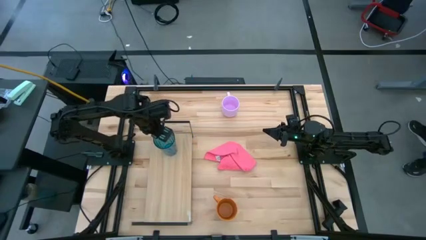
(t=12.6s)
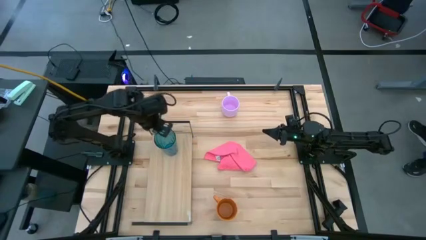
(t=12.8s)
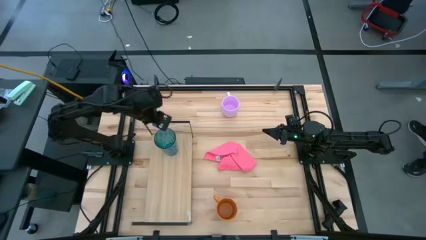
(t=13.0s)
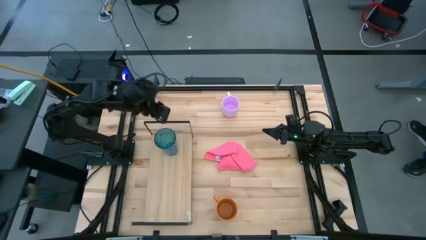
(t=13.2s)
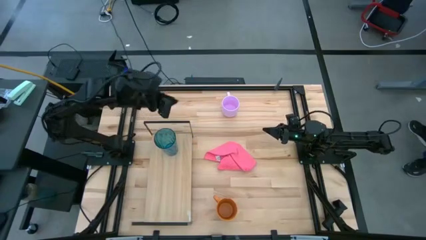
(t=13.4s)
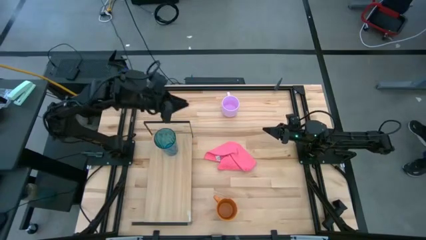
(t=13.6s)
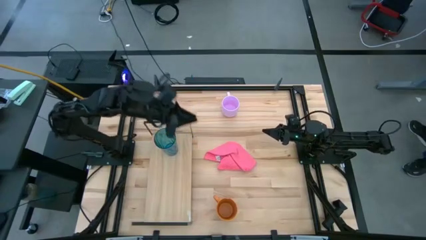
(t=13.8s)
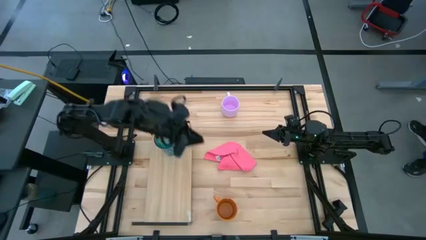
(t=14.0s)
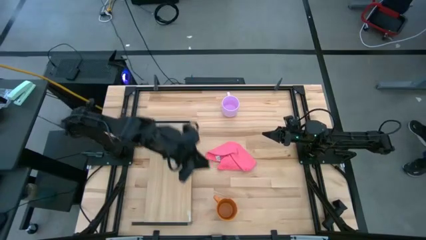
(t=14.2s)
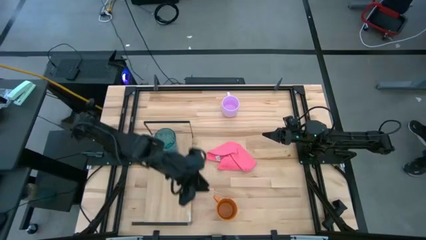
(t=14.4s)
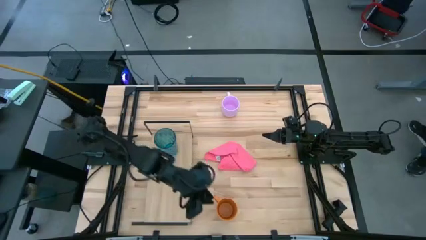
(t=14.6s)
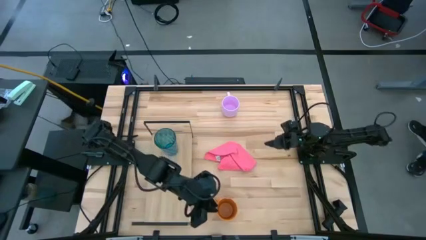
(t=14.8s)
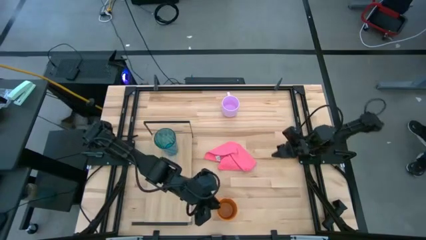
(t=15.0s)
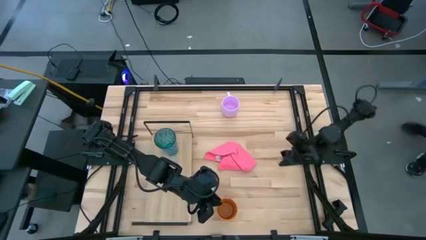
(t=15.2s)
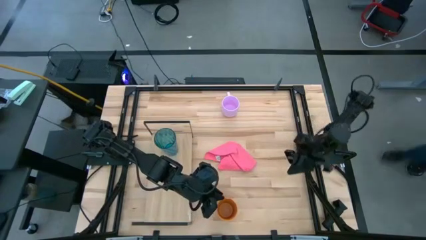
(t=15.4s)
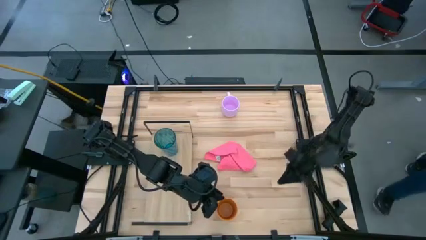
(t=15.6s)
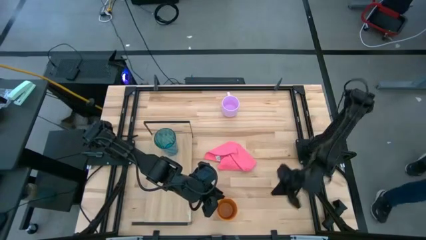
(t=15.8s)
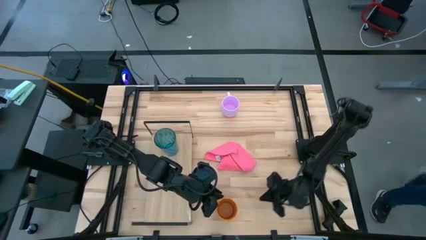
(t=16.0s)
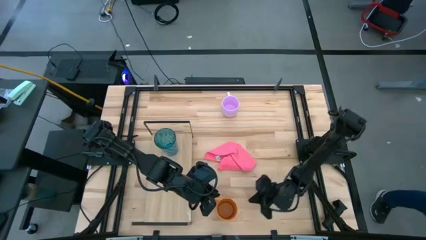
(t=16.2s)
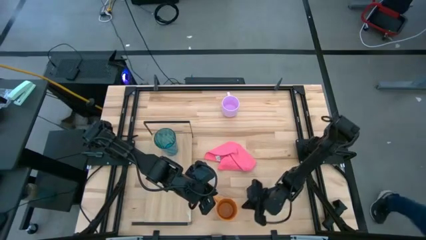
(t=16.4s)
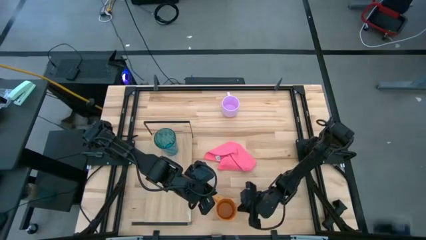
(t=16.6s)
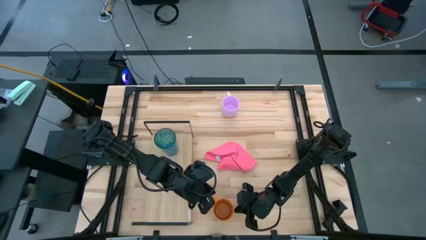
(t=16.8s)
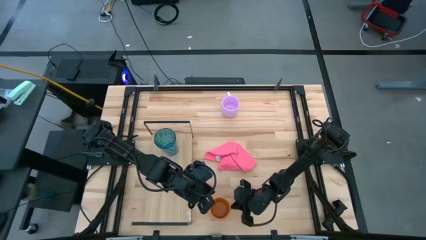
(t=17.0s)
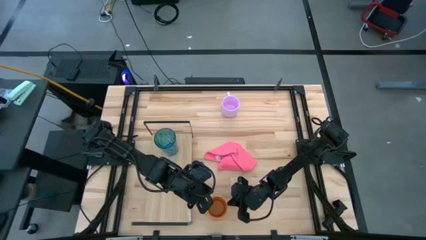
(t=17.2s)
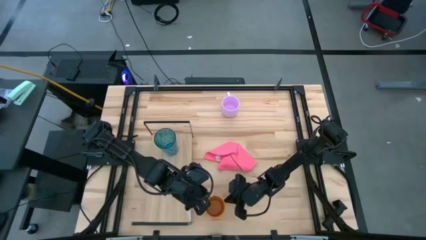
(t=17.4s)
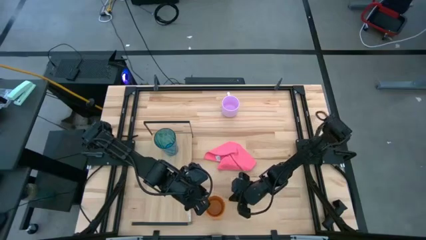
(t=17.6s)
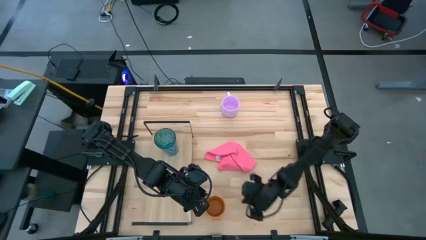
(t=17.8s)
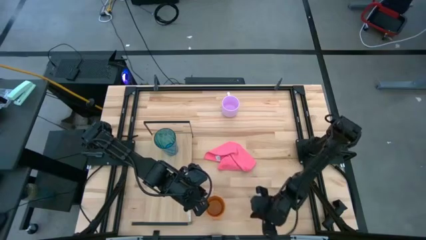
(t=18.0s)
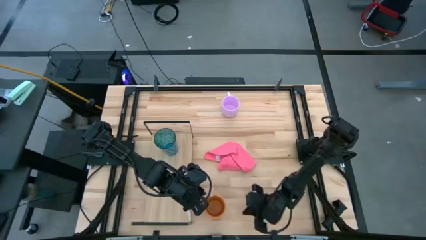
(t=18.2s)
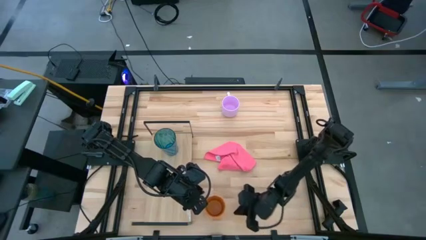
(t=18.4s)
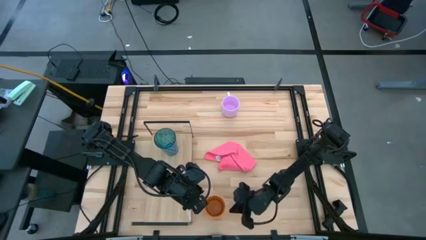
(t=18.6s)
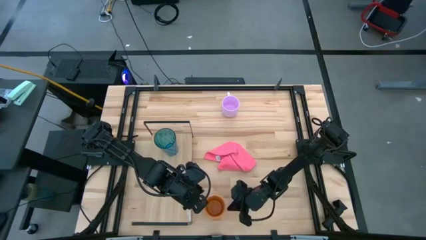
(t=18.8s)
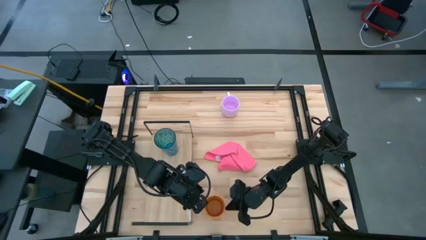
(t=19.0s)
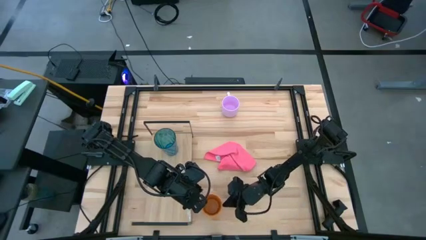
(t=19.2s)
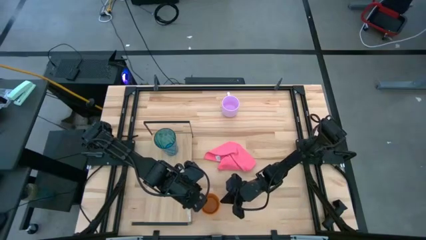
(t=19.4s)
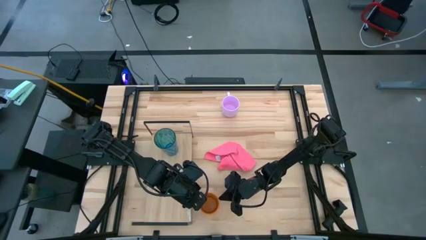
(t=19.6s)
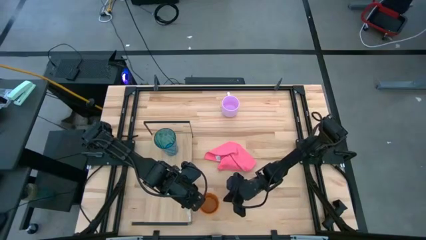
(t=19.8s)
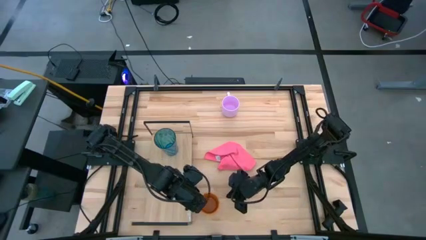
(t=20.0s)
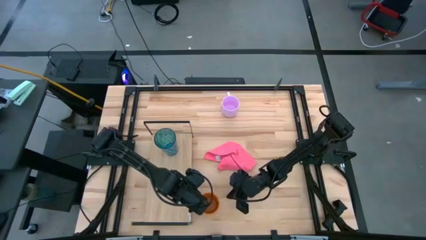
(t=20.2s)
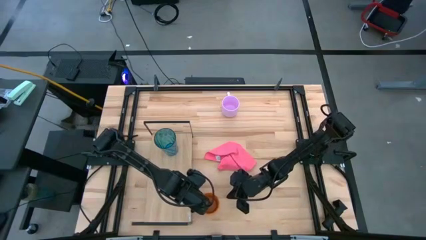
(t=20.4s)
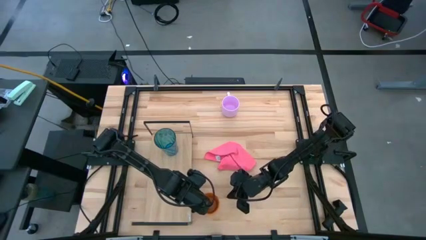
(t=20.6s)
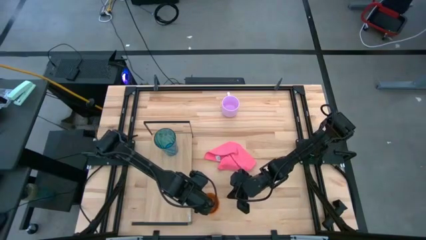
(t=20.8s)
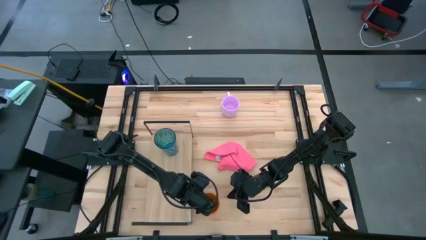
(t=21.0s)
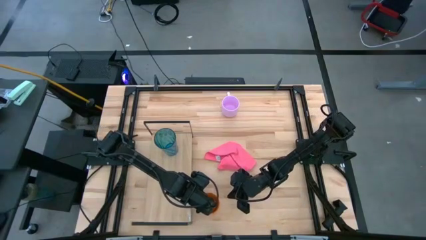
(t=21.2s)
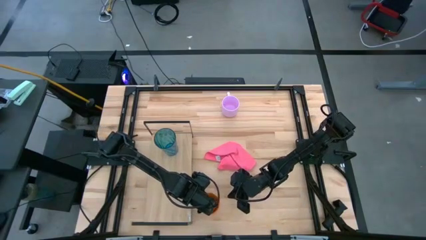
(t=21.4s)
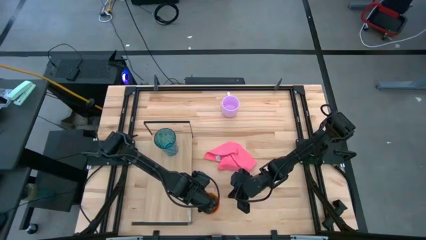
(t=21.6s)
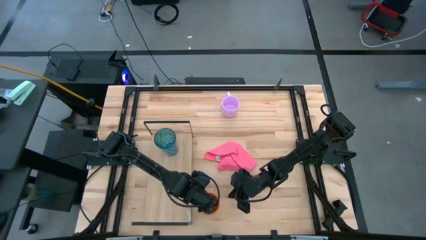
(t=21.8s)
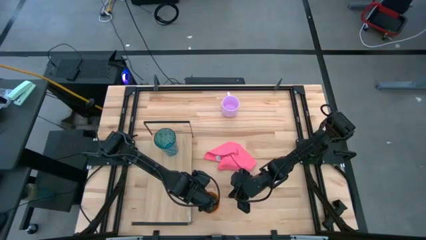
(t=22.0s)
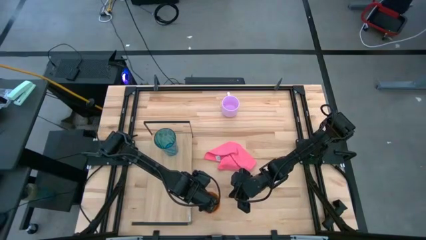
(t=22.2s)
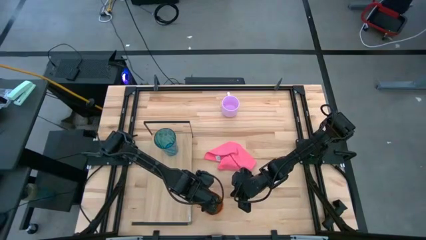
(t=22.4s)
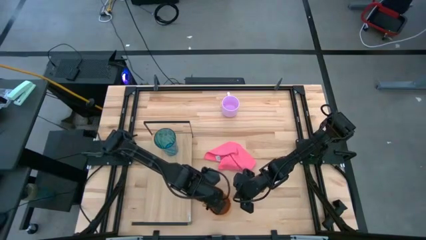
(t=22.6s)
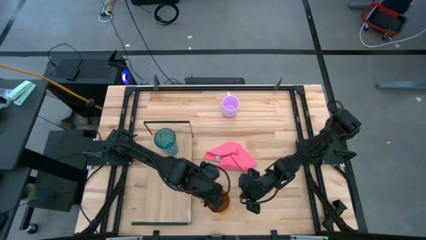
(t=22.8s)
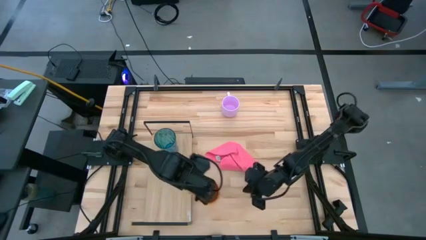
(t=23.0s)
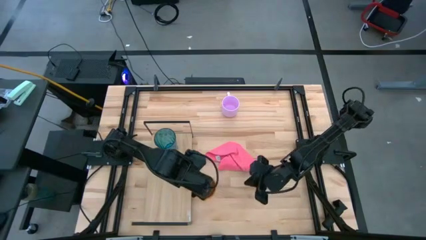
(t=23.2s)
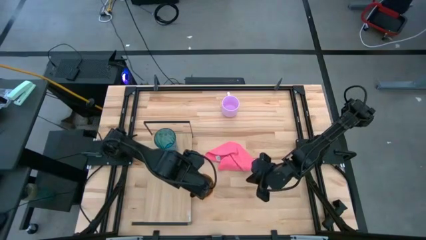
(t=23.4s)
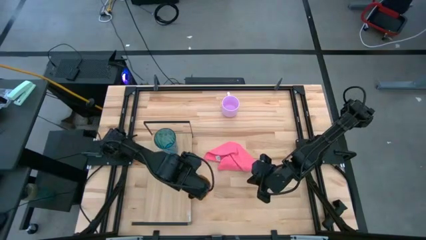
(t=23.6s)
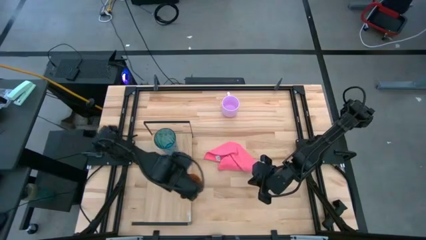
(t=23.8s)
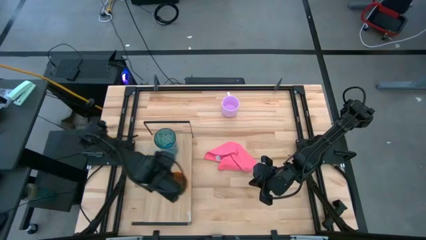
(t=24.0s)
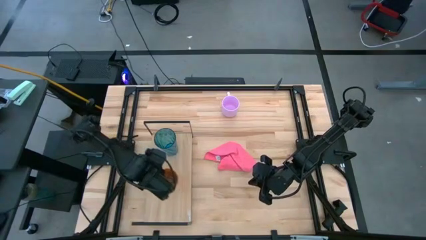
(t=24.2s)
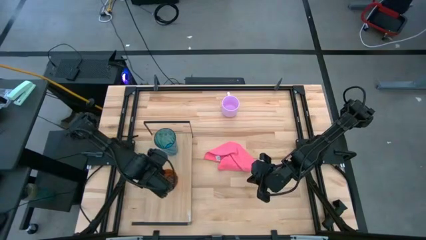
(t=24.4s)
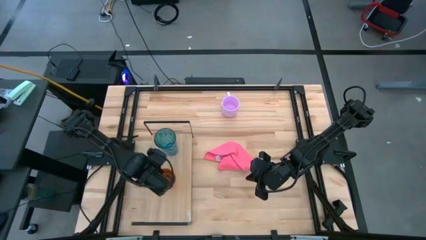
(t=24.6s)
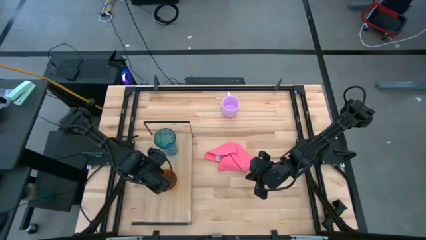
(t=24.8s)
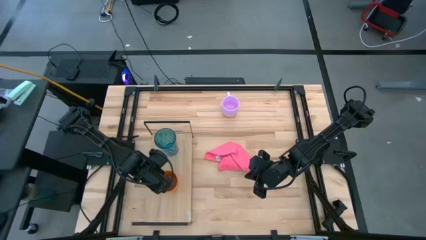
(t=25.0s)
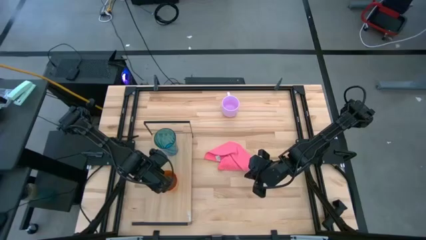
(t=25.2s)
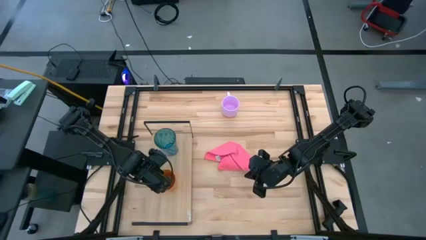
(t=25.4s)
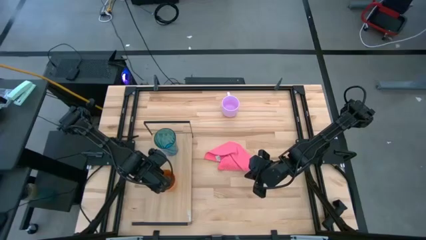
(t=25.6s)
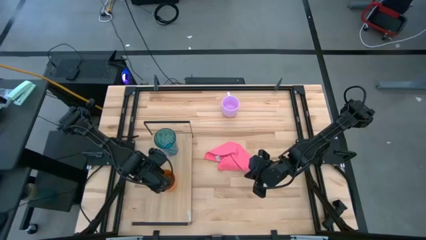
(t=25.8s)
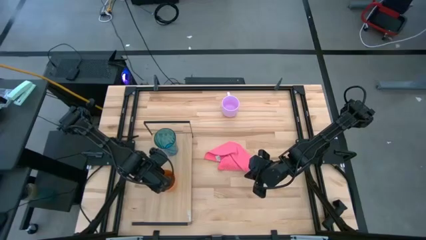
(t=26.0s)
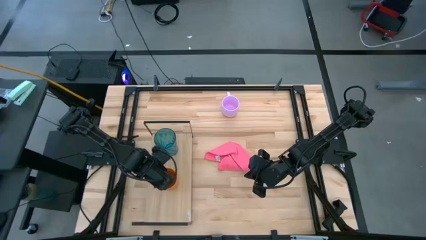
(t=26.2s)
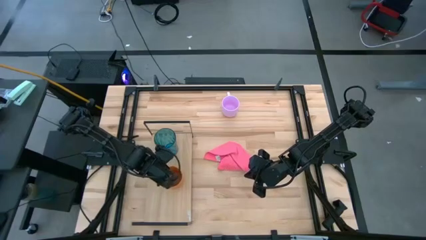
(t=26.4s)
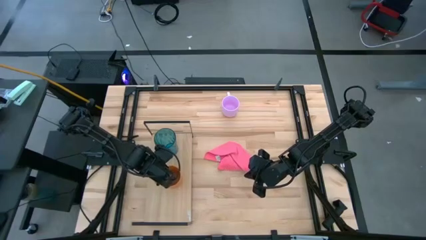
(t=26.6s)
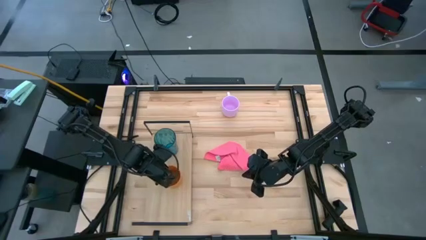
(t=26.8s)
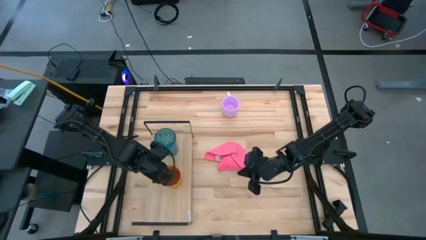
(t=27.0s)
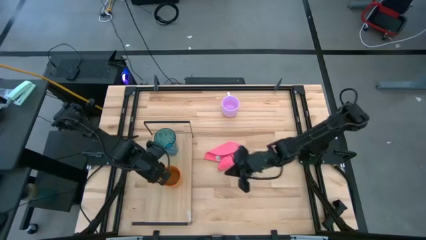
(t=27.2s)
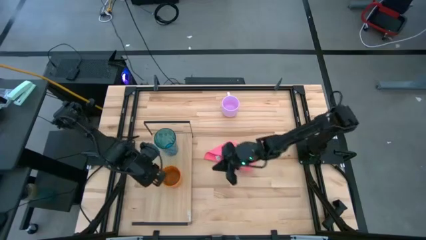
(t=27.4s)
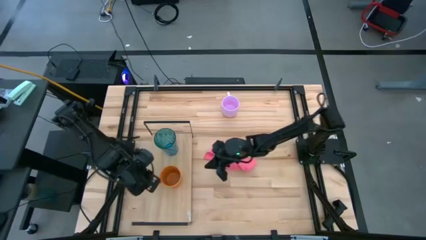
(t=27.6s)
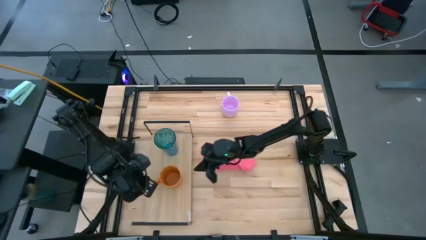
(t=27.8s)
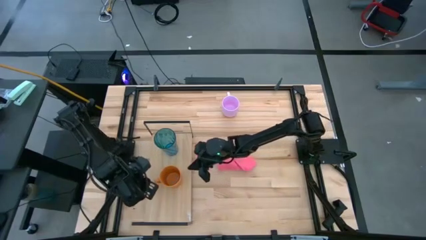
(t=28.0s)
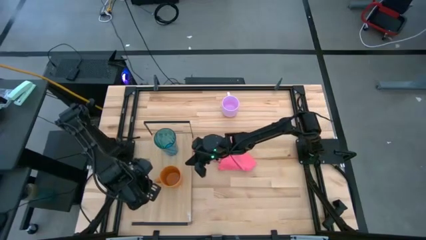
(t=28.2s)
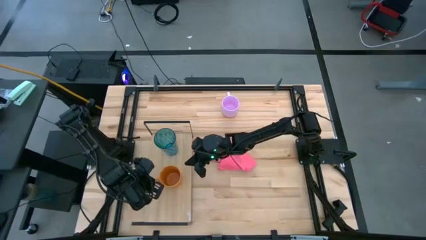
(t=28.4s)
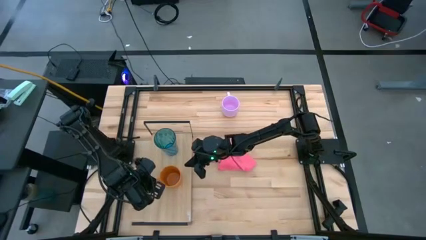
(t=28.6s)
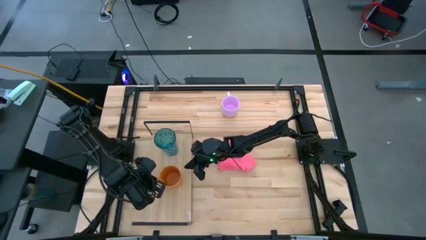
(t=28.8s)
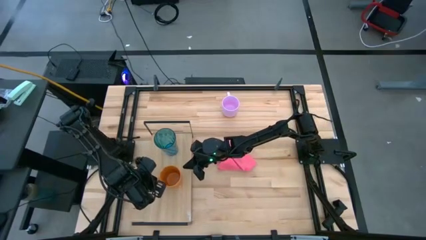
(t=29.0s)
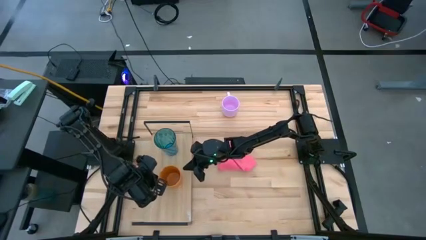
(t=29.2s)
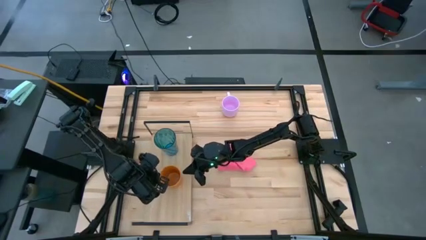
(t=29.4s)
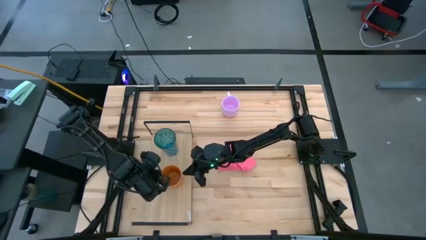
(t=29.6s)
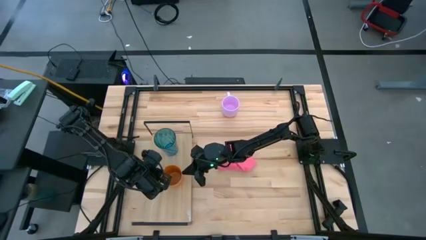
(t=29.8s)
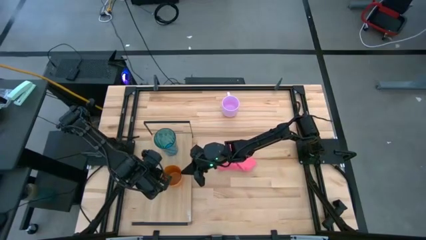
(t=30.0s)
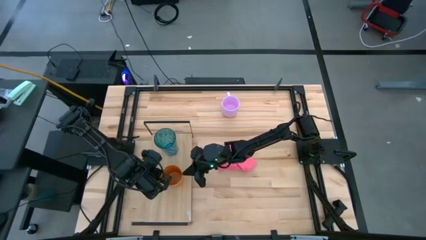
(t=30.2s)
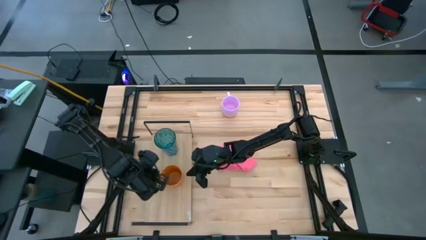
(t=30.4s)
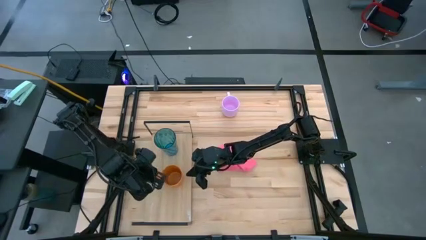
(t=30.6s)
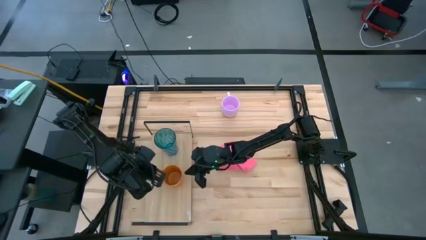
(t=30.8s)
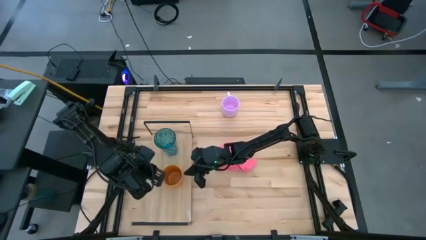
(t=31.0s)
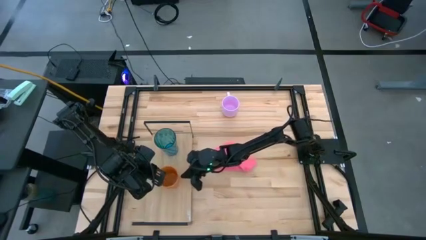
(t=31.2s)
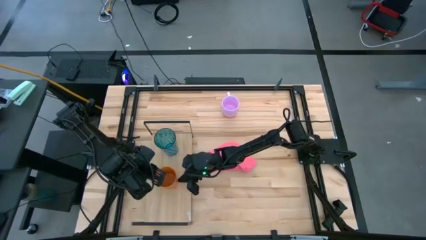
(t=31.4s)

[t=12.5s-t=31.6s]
Task: Stack small to large cups/mugs on shelf
Put the orange mug on the shelf
